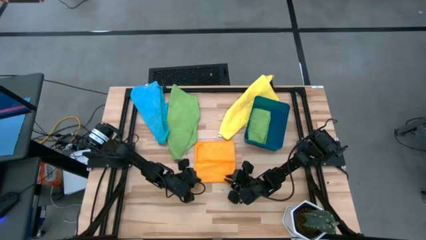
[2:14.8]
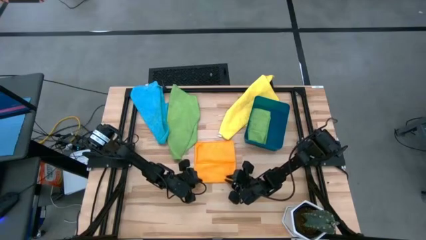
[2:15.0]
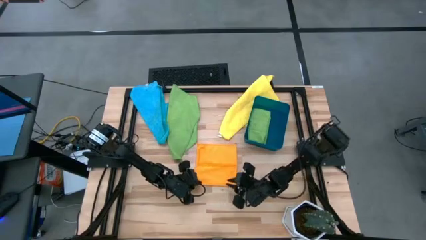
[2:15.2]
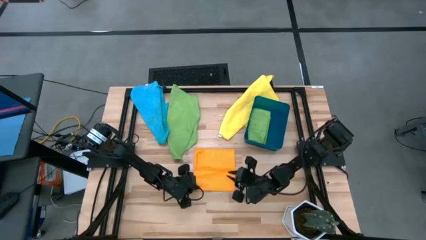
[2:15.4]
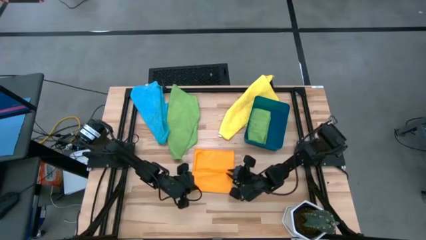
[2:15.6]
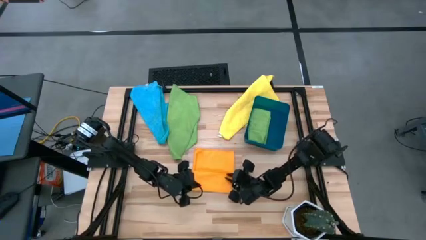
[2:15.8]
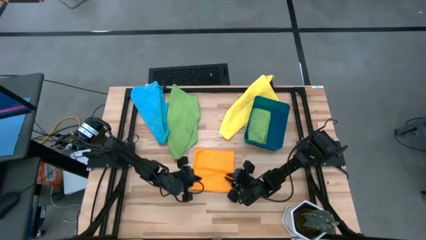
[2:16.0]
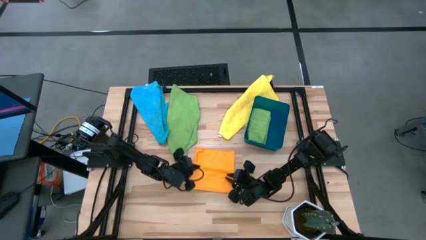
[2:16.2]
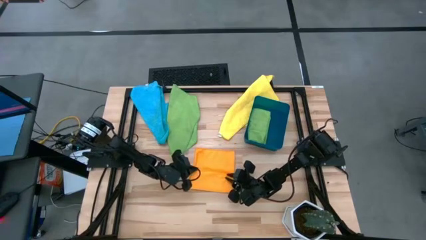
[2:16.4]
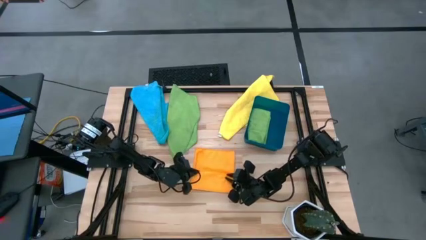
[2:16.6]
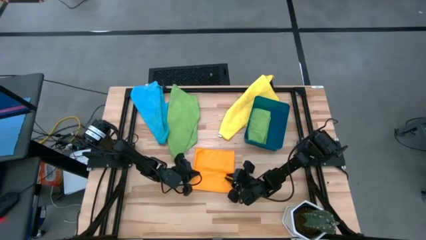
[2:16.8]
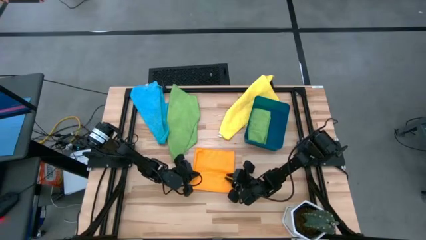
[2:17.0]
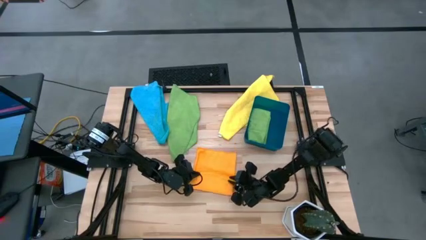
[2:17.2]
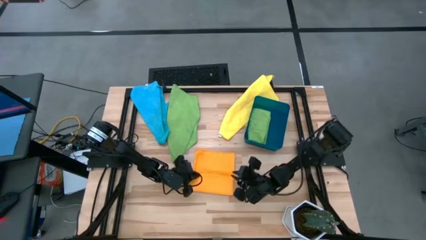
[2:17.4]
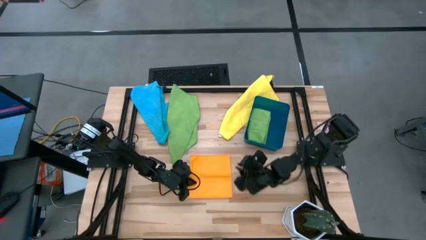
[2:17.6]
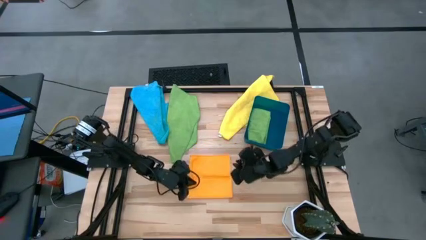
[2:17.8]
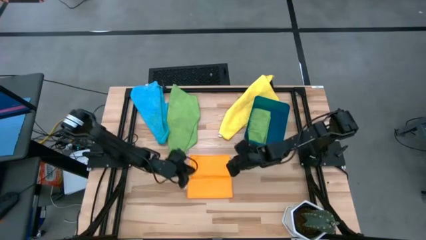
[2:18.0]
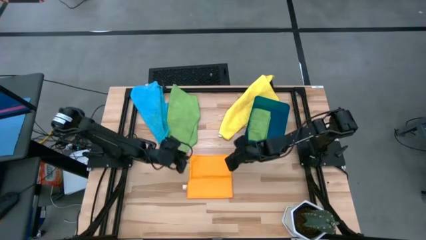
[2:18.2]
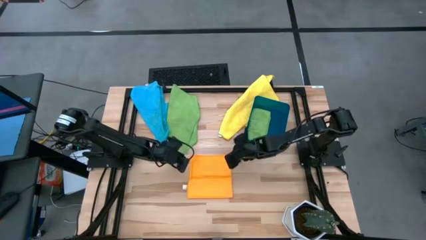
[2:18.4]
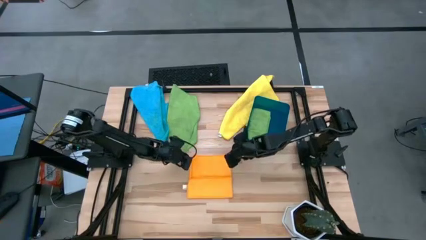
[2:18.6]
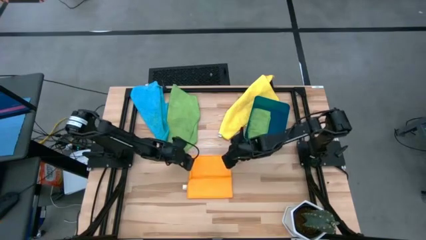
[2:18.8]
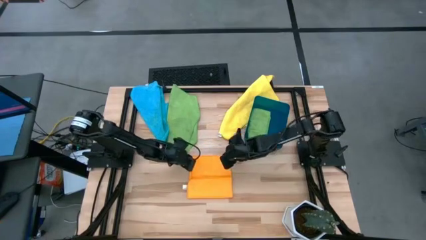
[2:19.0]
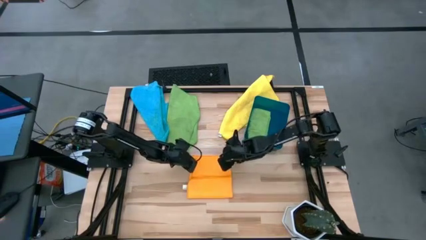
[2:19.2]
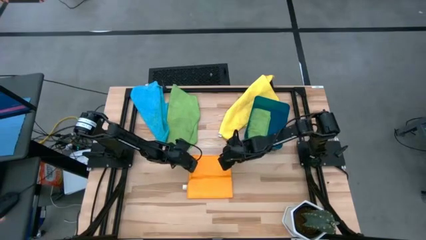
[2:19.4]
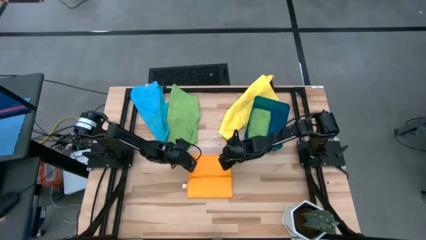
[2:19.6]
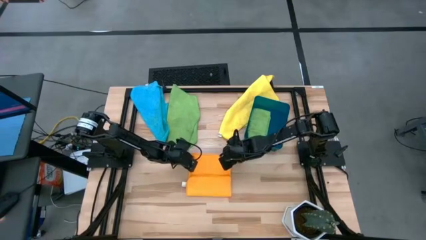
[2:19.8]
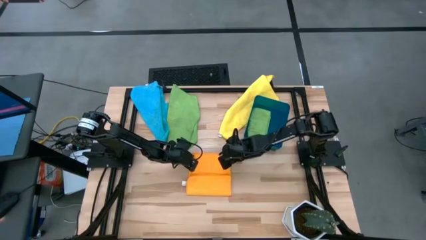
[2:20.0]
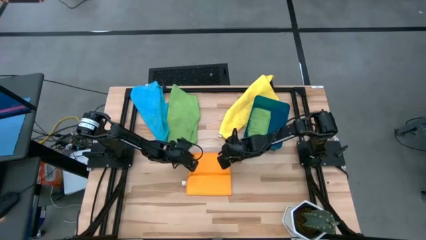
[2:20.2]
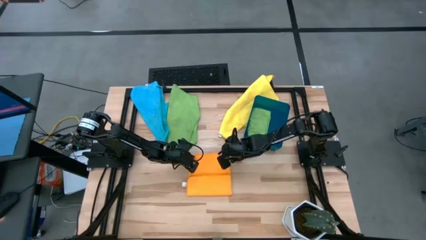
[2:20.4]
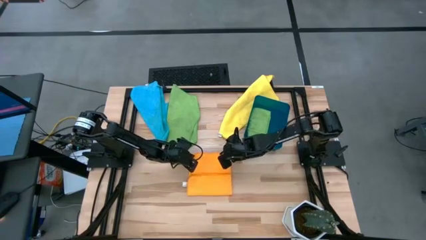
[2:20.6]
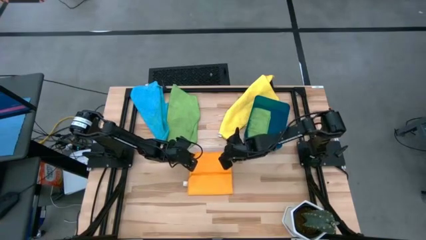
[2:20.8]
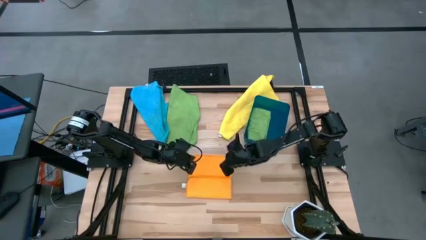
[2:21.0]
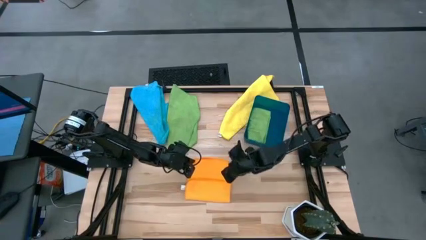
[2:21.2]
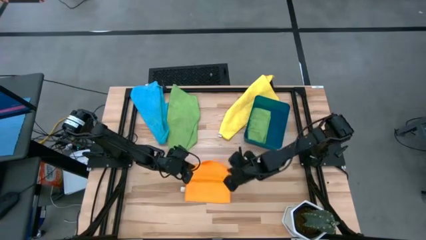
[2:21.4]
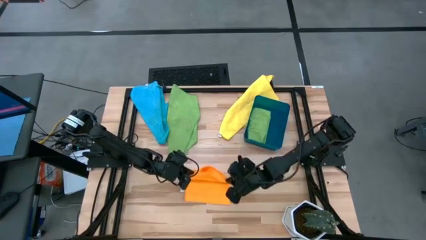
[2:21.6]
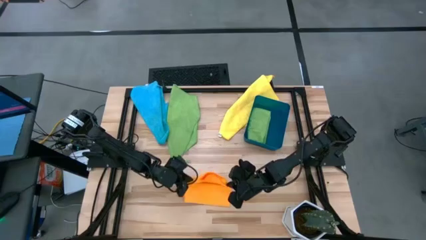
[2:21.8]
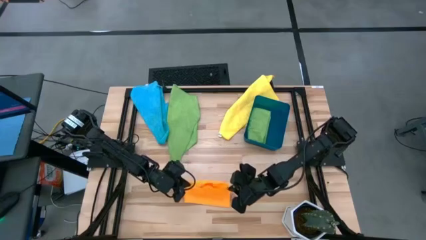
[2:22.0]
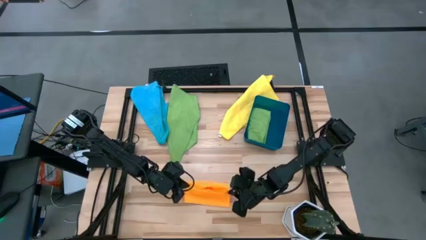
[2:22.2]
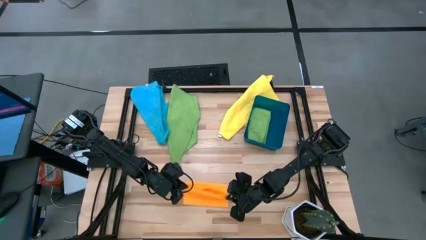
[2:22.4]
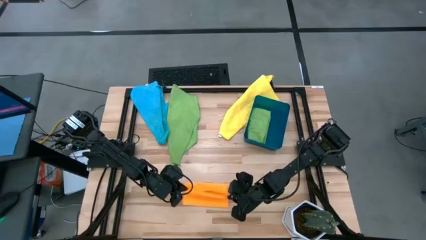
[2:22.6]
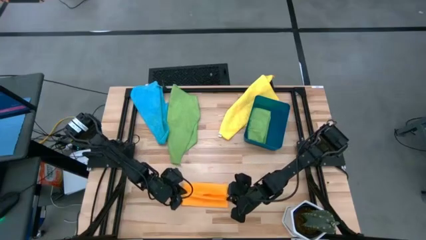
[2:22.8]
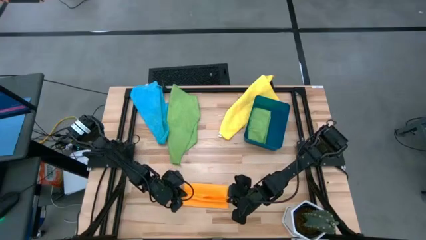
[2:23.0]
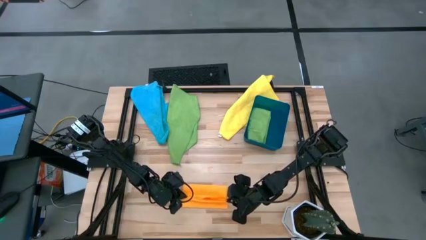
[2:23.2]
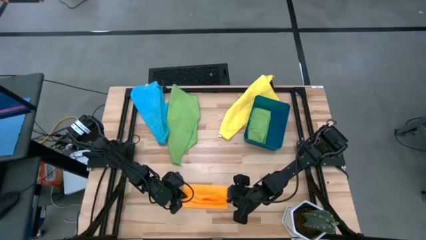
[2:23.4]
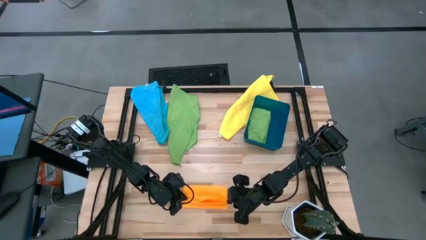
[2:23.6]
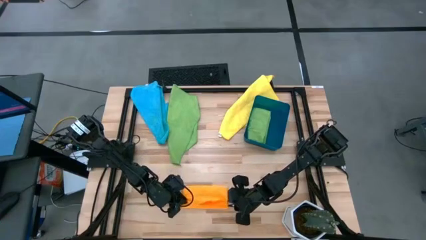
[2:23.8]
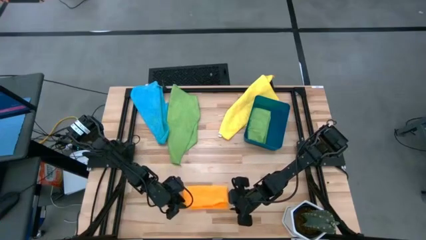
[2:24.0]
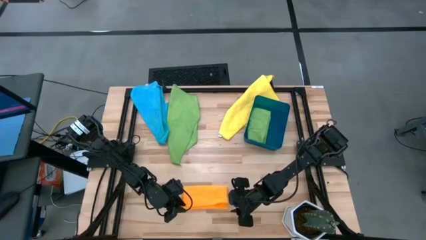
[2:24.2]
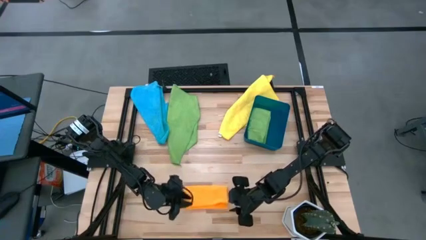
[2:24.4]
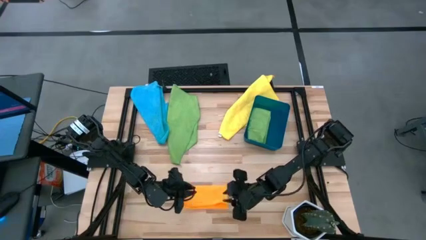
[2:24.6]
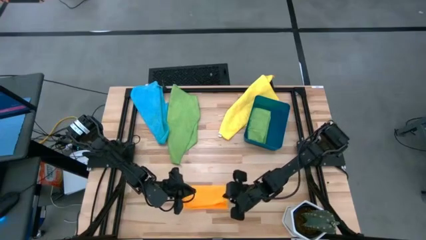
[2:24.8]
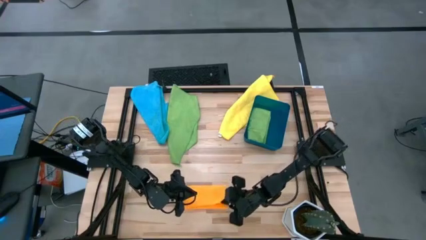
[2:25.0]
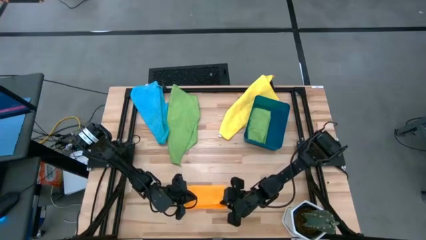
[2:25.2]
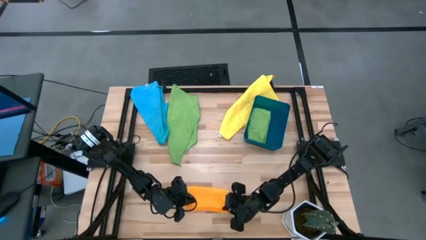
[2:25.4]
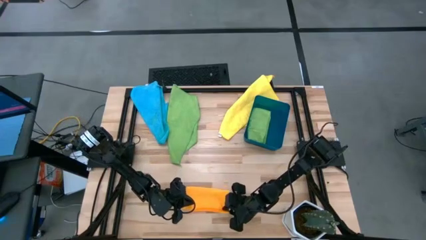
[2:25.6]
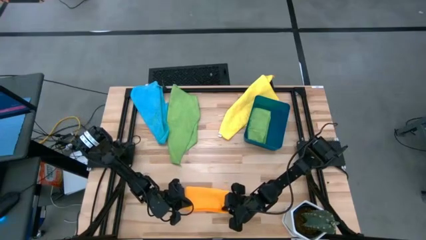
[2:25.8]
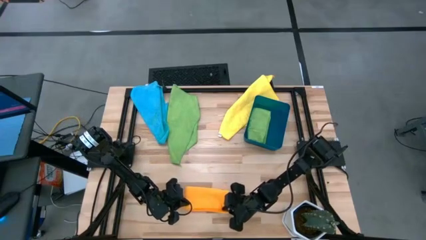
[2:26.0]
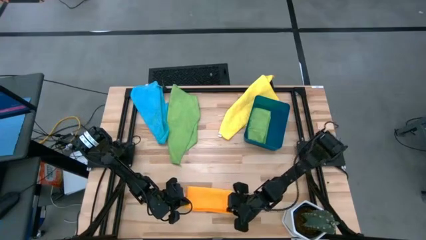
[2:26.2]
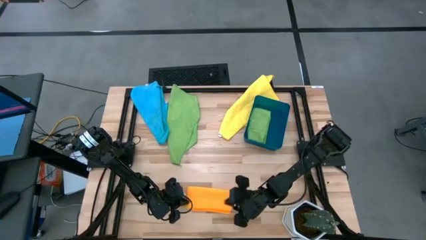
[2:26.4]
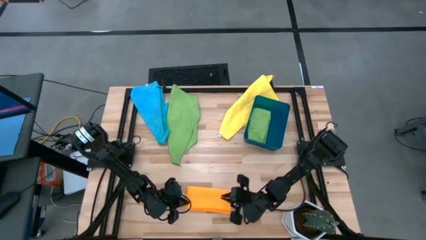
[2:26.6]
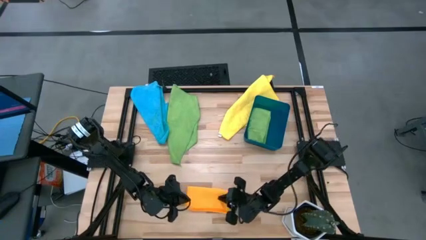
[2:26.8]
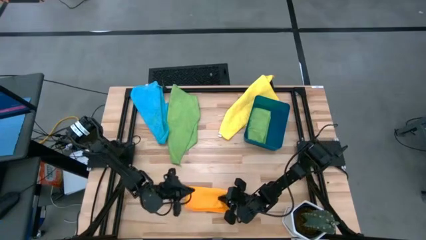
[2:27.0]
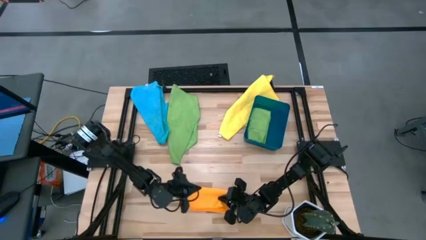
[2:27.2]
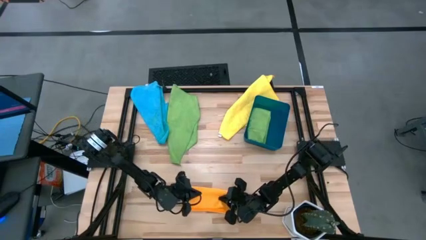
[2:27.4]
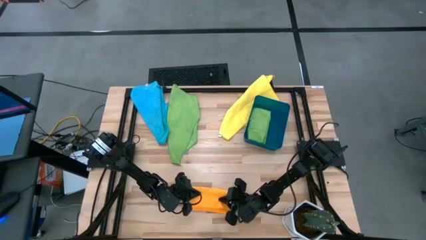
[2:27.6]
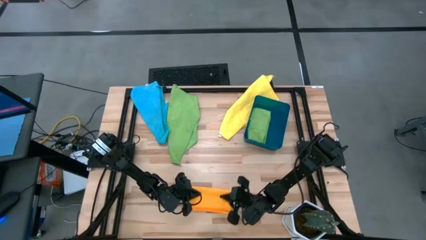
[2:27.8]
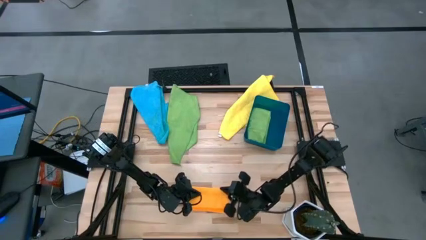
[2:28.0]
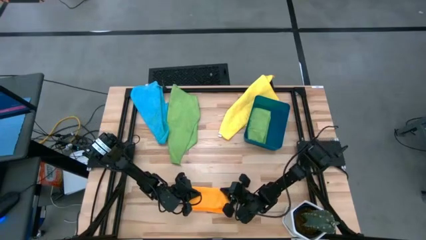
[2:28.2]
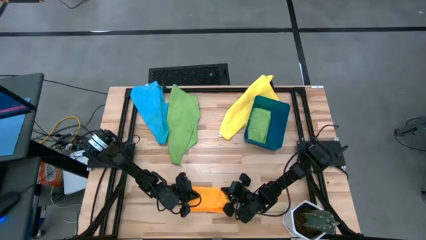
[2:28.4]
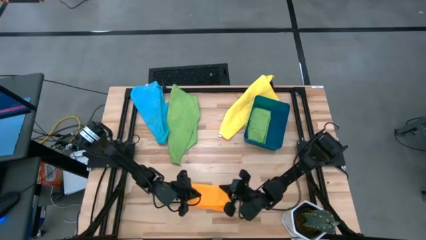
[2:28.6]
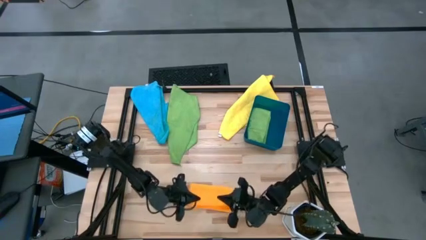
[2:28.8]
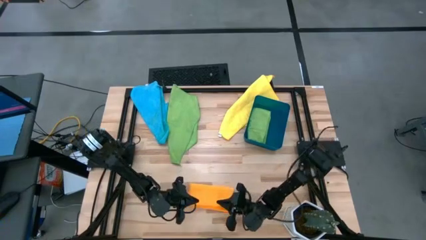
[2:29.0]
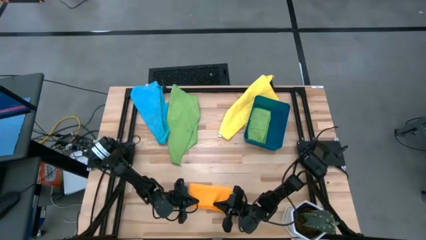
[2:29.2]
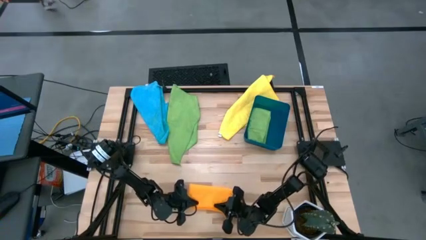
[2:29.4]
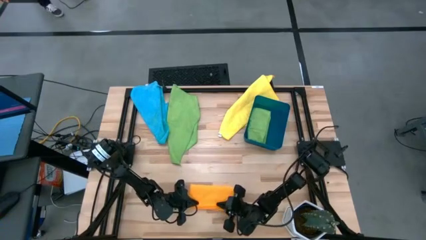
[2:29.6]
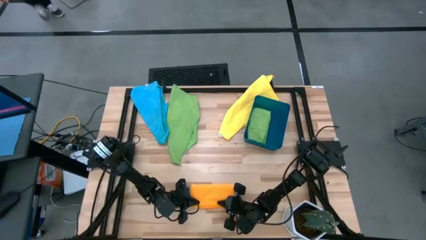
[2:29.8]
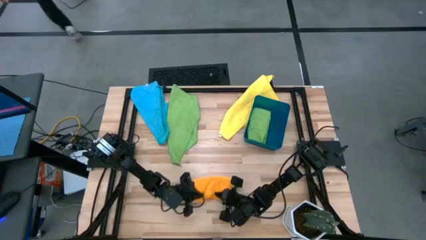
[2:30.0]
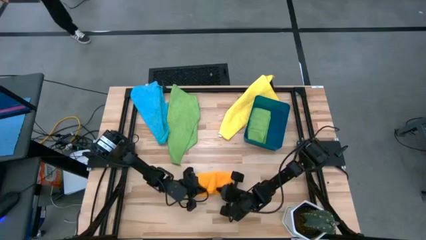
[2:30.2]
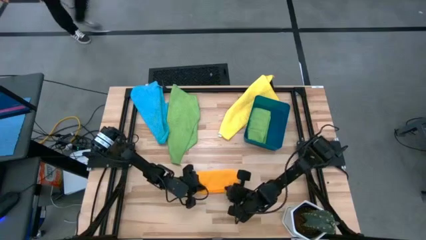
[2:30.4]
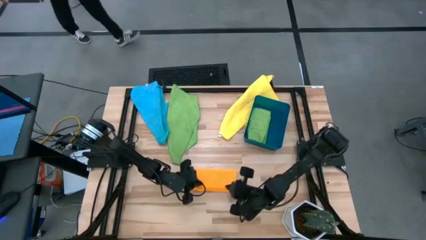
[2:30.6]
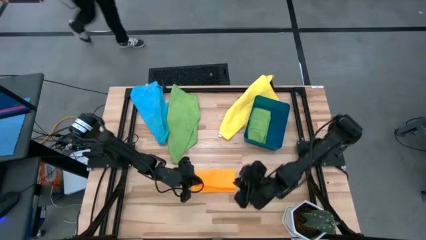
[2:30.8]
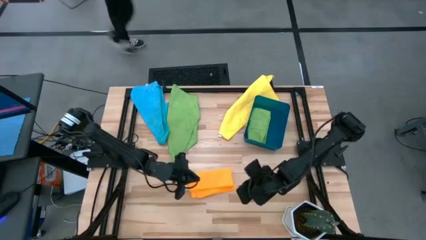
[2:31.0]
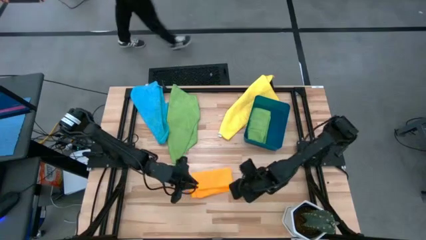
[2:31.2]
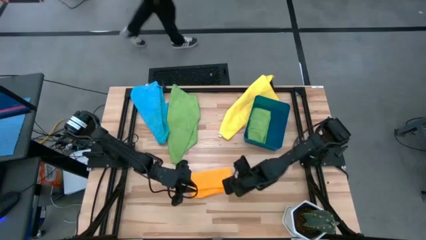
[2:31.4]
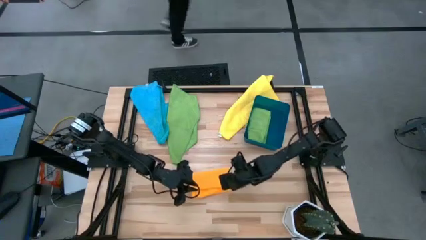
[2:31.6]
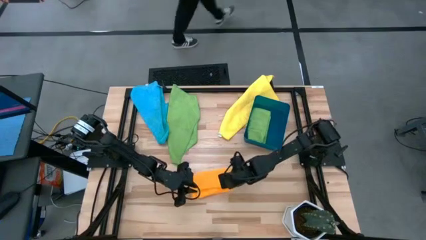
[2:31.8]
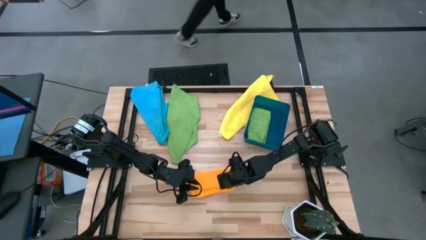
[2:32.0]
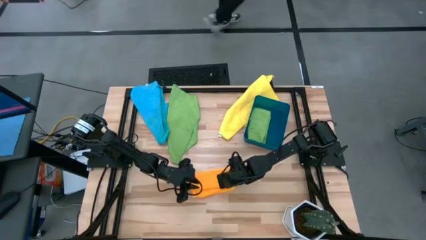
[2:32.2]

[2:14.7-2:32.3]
Task: Fold microfiber towels
Fold the orange microfiber cloth
